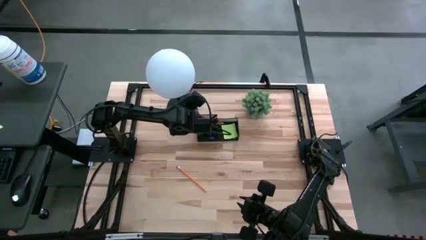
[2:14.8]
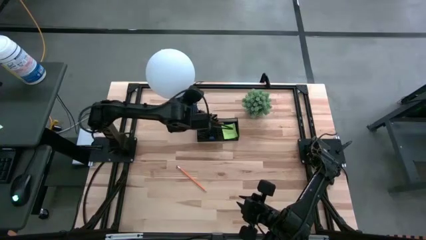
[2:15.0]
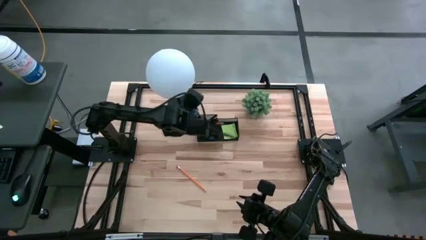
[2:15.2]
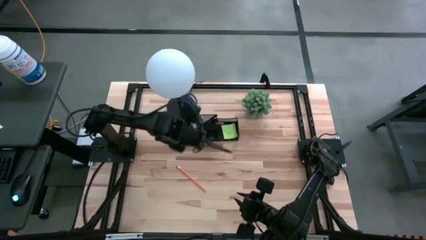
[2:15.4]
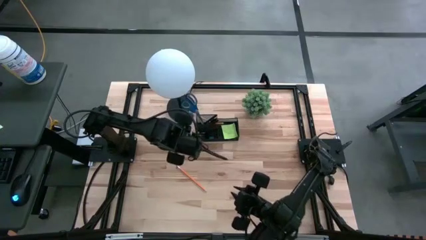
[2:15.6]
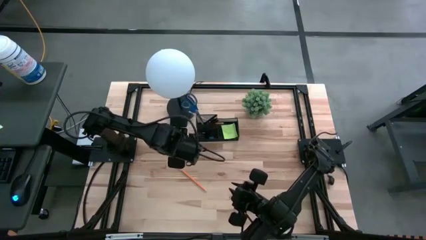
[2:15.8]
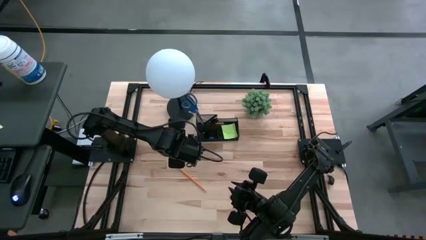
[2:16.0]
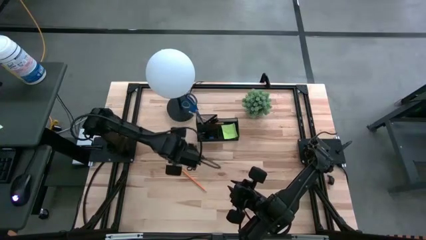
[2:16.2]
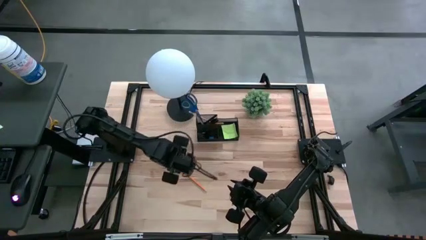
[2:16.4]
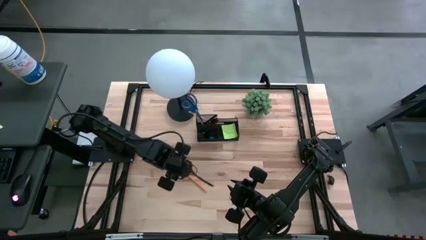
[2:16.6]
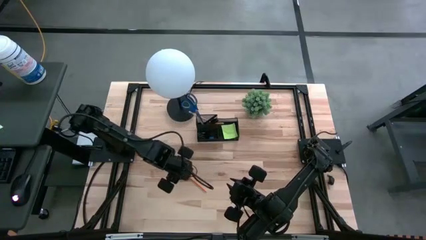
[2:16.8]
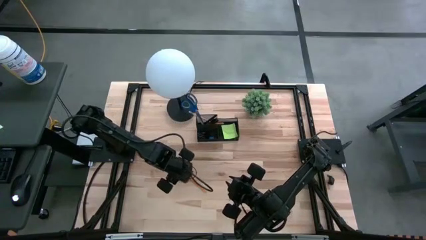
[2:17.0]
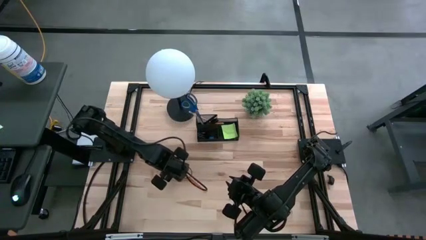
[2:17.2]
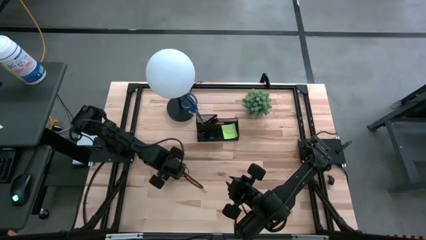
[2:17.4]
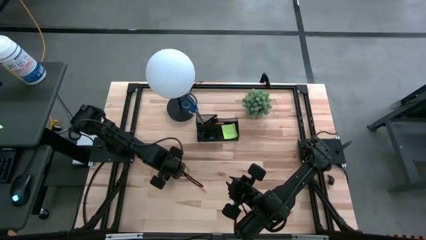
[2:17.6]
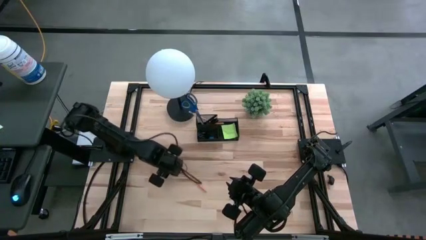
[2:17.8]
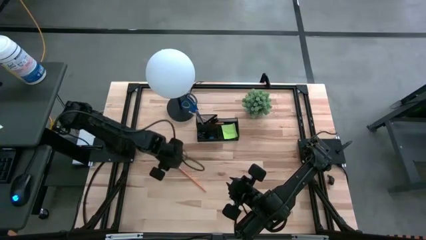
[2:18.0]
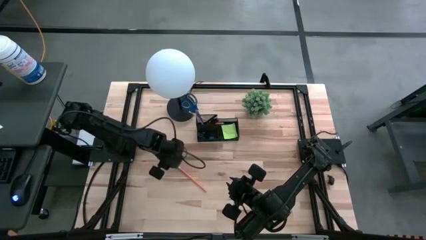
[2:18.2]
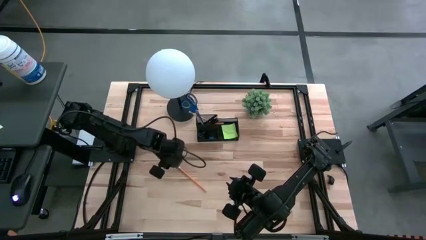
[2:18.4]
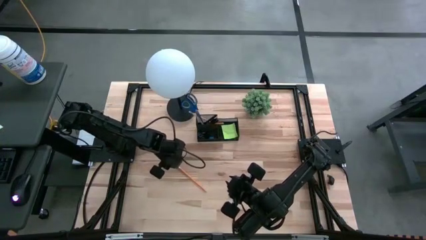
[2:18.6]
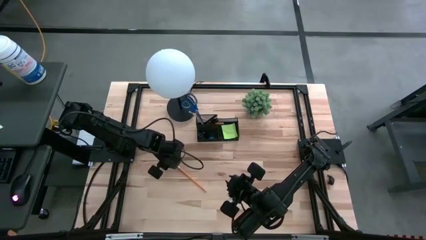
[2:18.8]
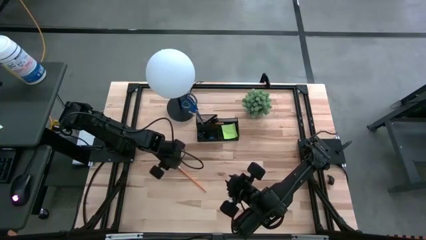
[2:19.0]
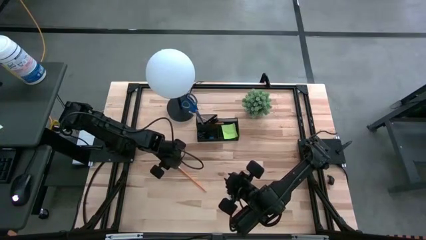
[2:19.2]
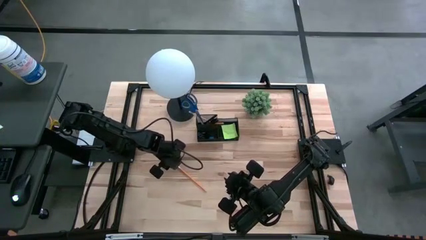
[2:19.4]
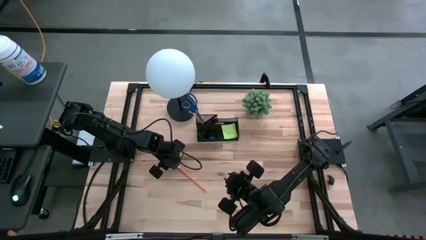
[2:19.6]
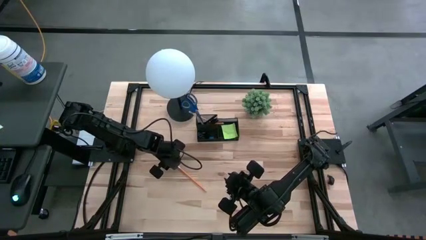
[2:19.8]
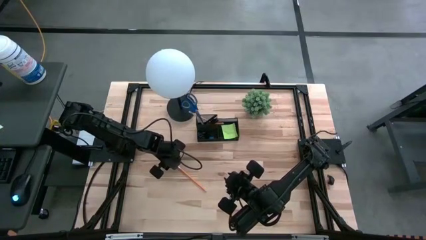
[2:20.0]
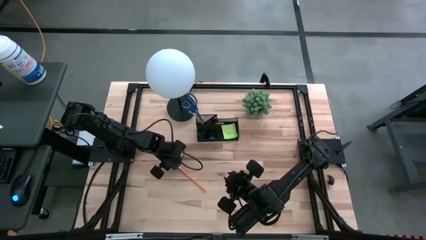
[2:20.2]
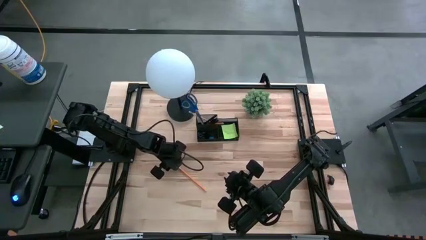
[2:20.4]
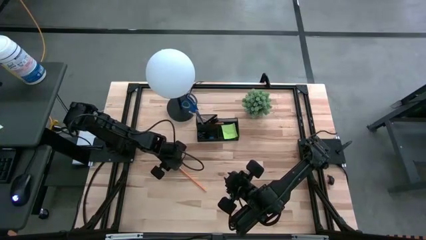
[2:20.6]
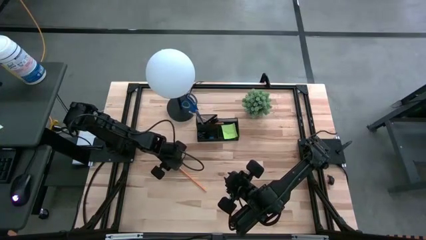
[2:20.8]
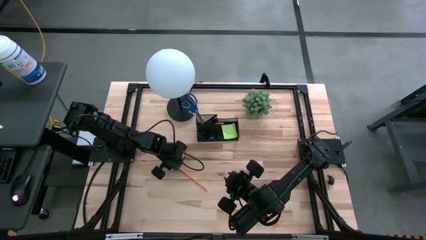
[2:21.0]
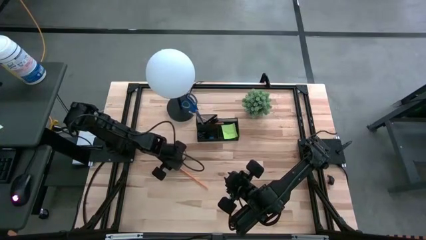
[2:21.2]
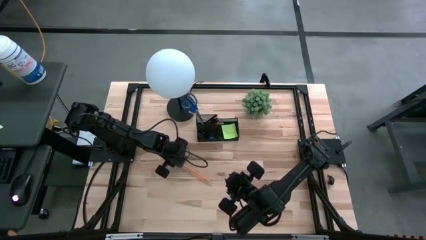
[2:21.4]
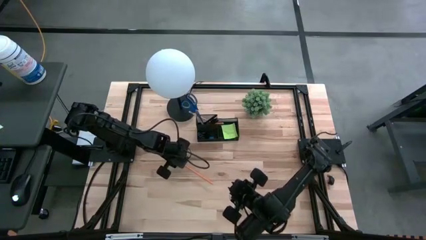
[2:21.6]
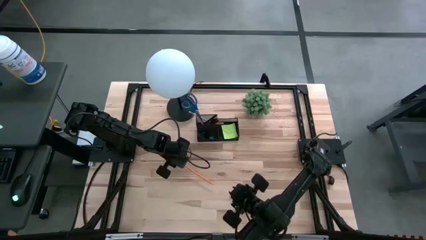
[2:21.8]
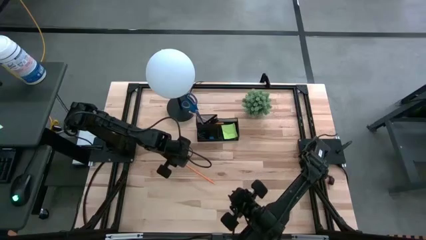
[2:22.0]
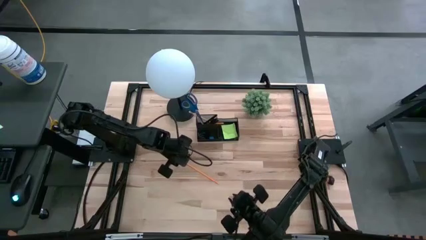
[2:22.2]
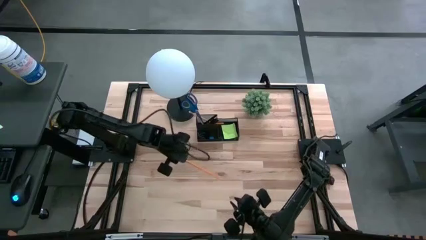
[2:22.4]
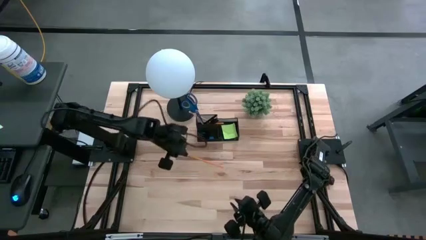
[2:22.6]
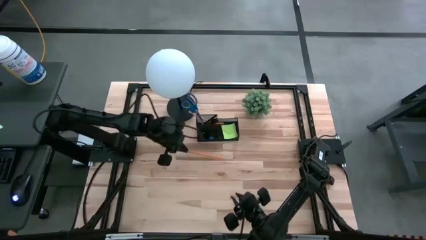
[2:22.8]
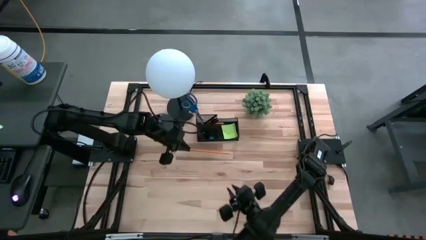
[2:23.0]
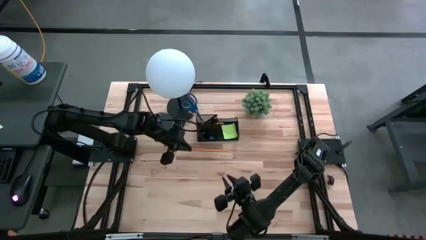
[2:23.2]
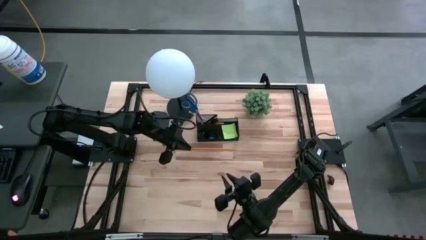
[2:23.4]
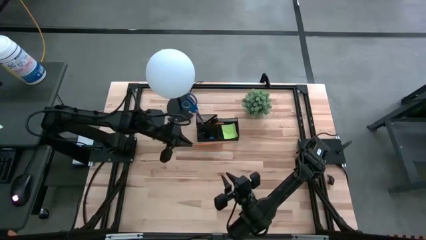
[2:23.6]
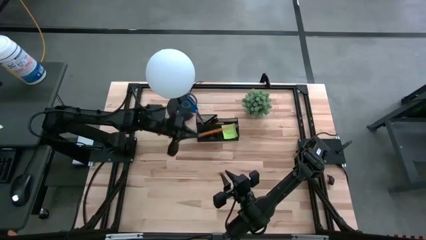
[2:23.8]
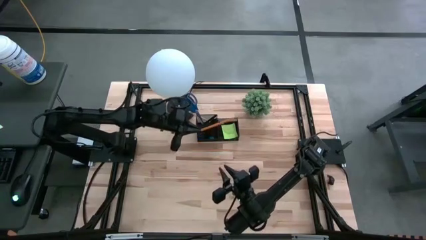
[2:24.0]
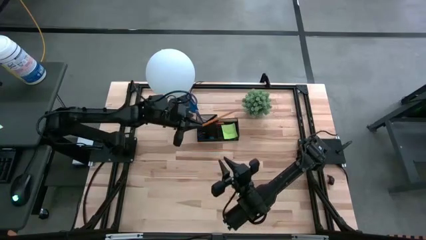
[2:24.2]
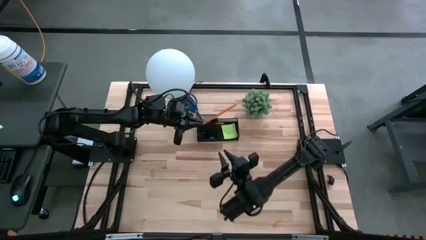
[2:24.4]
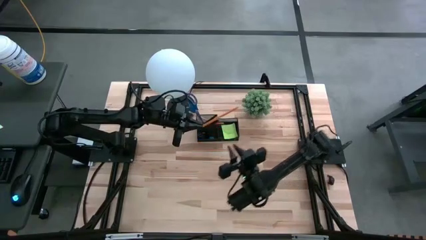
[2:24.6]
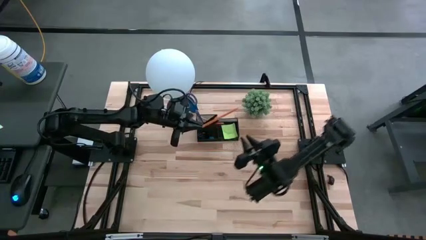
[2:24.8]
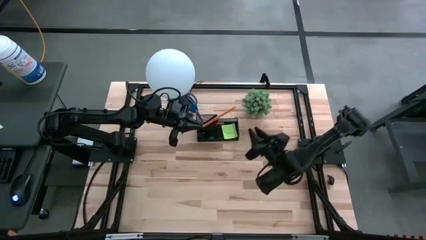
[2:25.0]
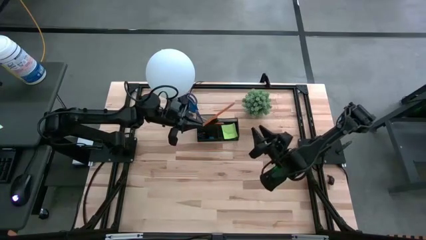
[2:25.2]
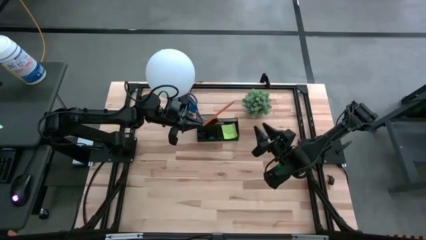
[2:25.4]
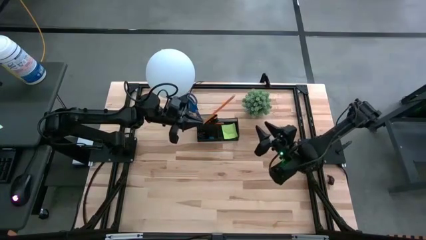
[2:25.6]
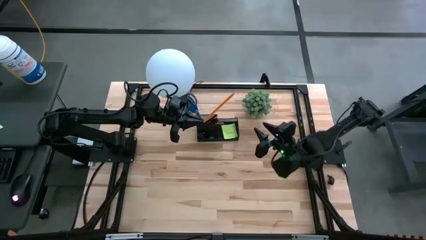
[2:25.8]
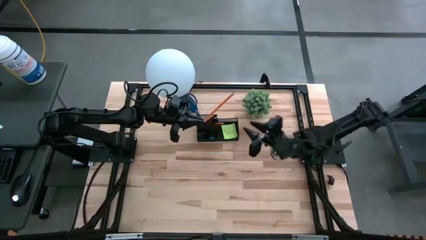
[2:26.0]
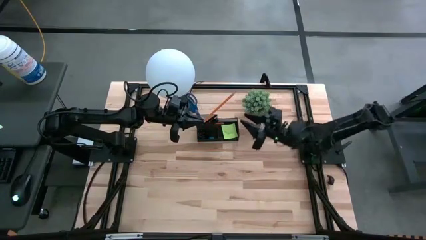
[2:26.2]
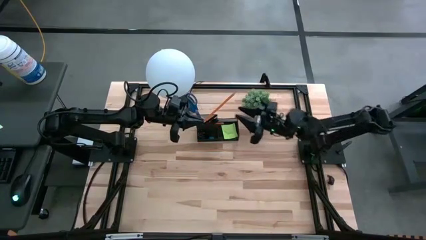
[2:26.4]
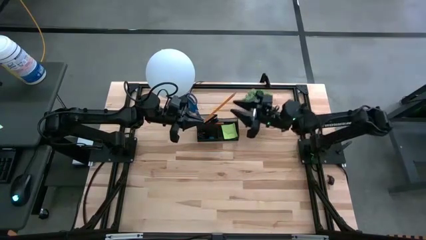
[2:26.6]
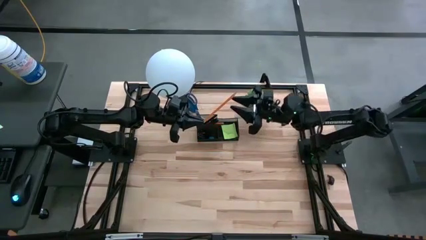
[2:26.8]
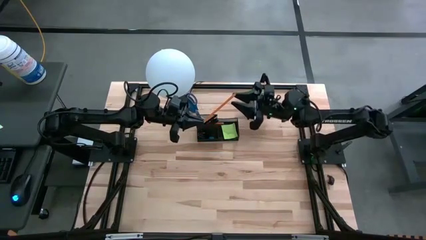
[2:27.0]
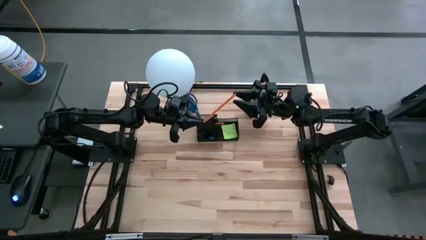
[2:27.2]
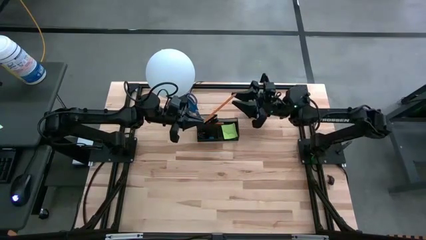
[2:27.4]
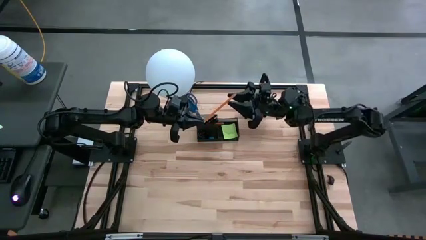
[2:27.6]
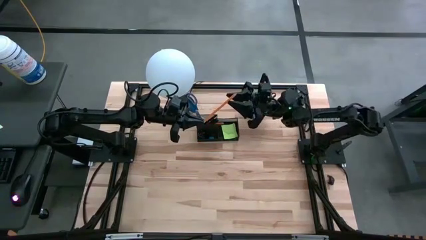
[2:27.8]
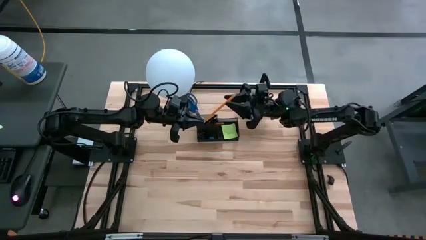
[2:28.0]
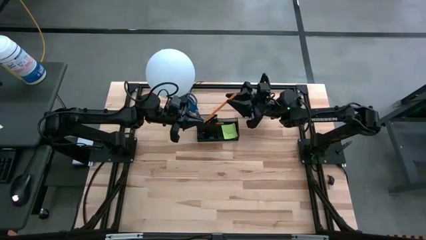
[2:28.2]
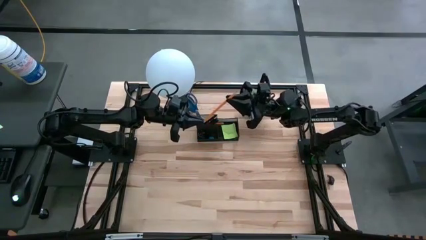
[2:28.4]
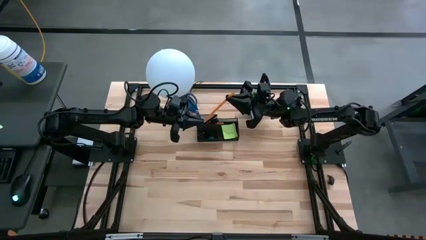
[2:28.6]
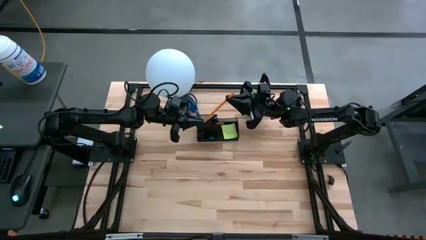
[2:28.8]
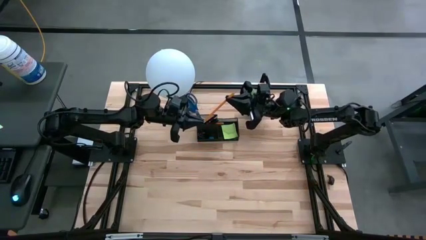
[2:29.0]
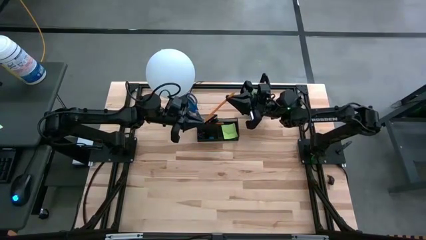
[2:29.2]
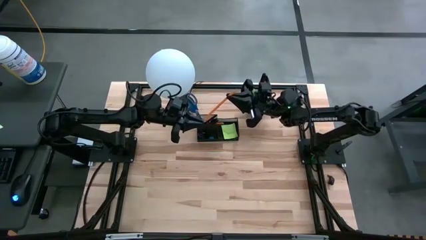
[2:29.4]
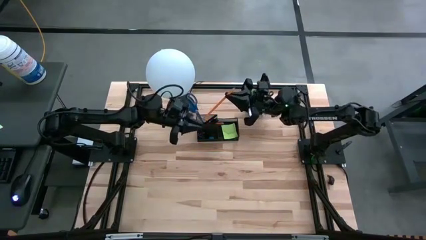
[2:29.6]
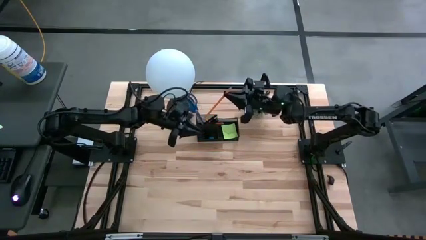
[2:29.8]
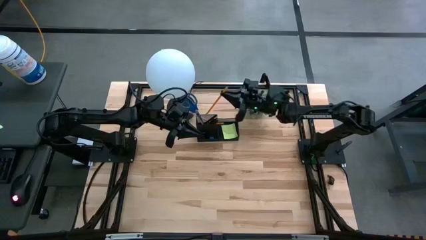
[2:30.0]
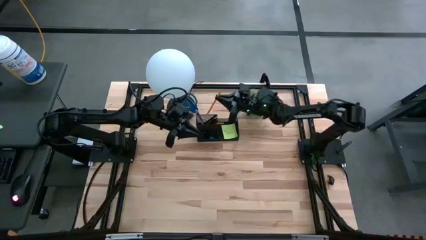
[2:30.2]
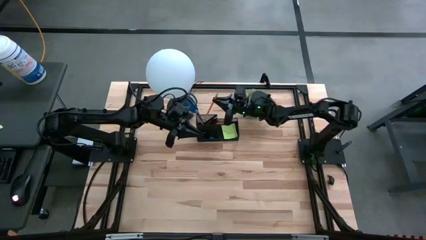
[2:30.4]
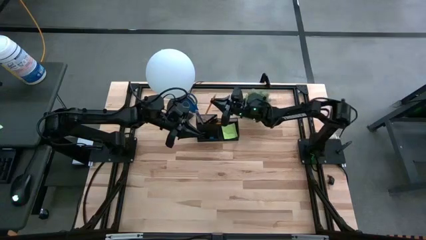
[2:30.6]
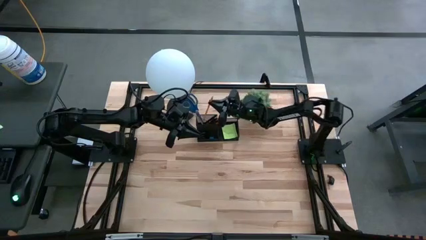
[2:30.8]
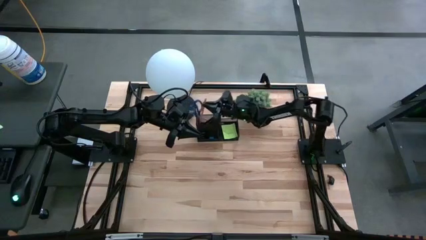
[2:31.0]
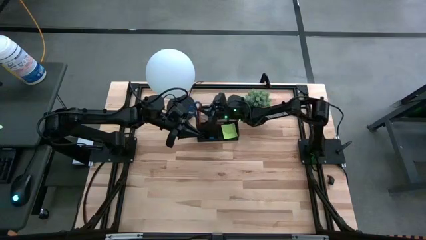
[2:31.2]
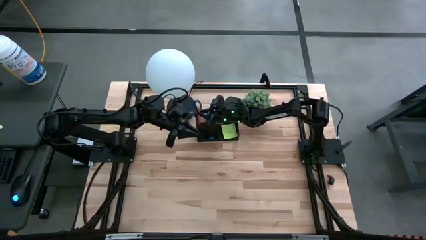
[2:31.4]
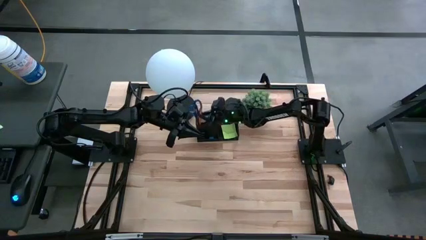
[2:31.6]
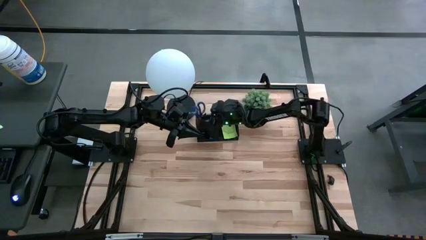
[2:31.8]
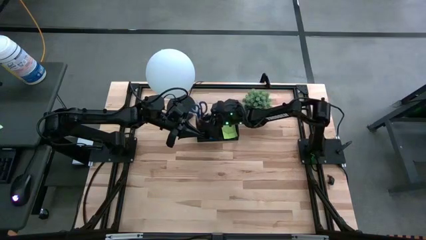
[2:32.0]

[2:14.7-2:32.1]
Task: Pick and place office supplies into organizer
Put the orange pencil into the desk organizer
